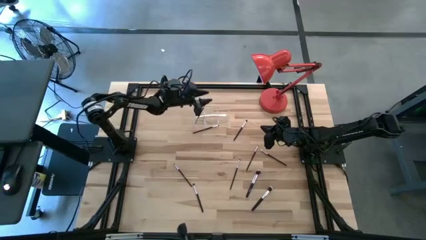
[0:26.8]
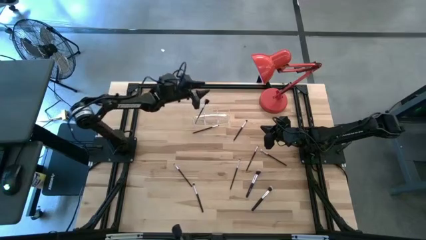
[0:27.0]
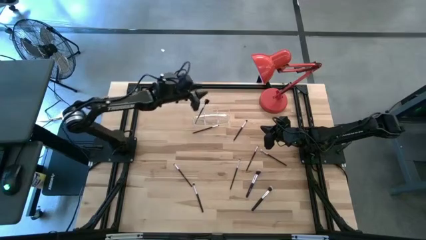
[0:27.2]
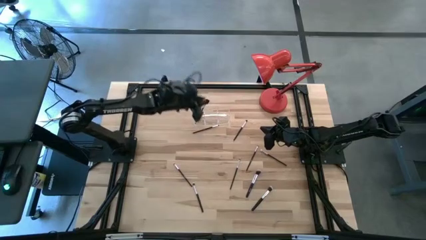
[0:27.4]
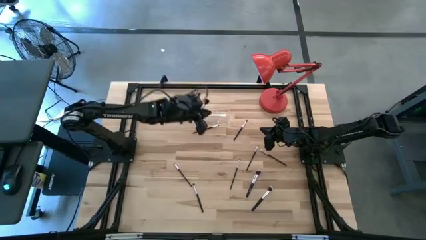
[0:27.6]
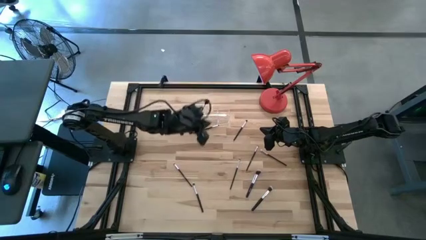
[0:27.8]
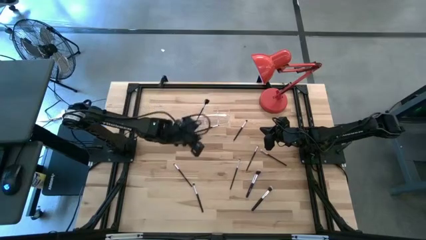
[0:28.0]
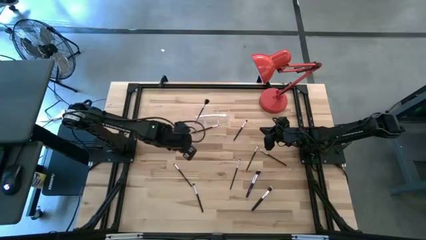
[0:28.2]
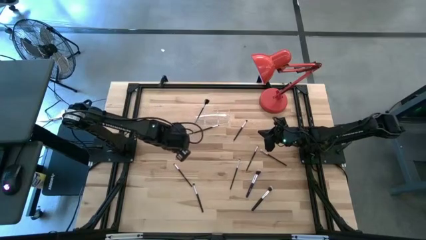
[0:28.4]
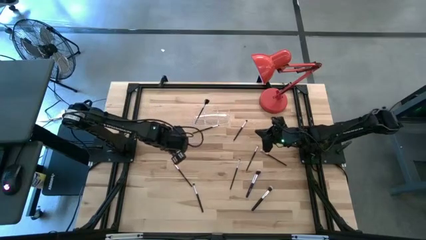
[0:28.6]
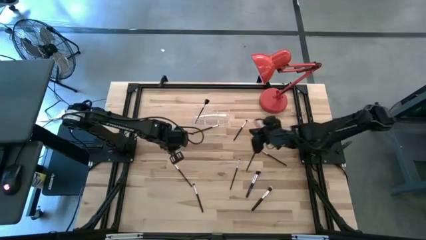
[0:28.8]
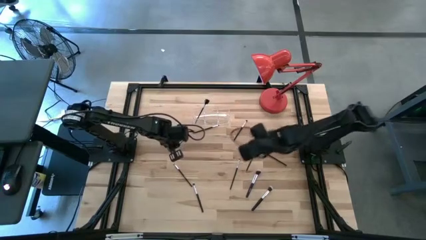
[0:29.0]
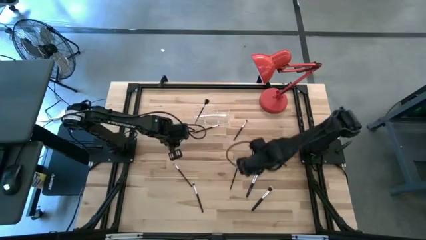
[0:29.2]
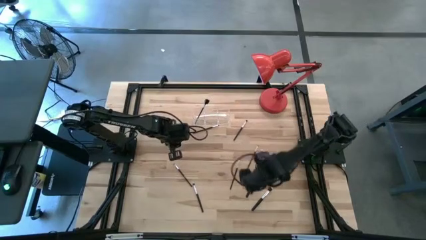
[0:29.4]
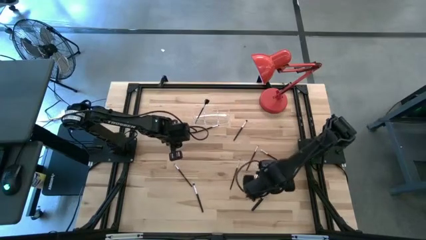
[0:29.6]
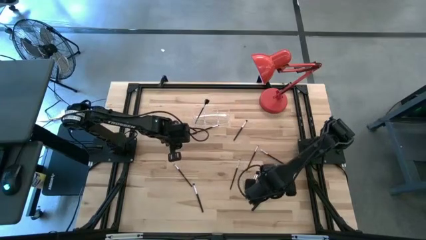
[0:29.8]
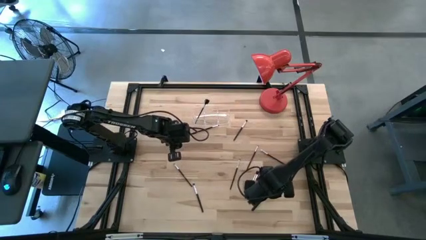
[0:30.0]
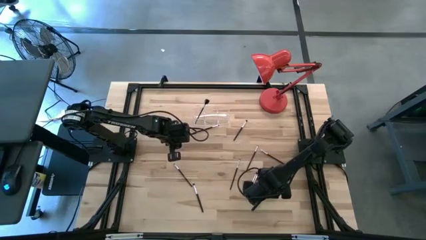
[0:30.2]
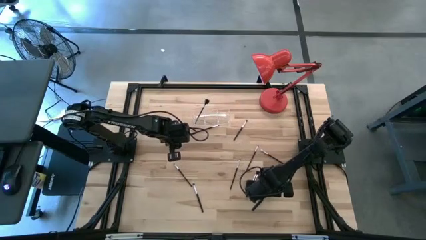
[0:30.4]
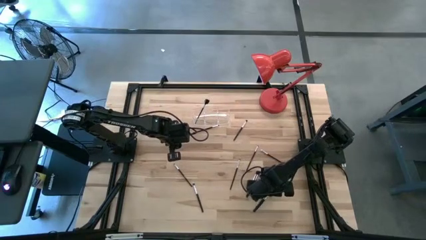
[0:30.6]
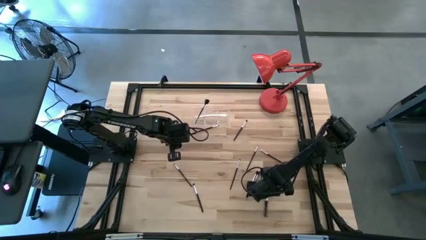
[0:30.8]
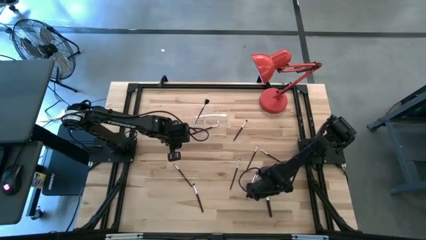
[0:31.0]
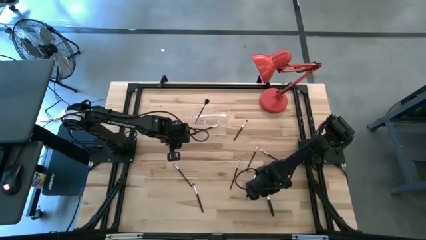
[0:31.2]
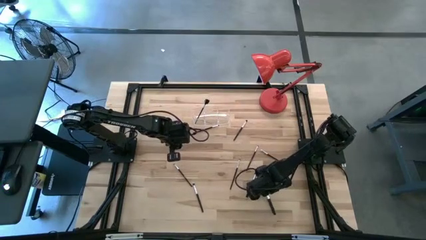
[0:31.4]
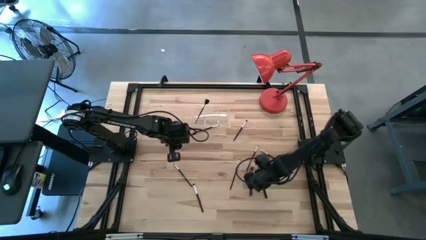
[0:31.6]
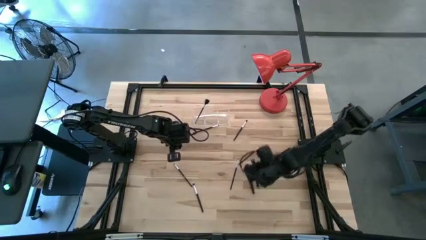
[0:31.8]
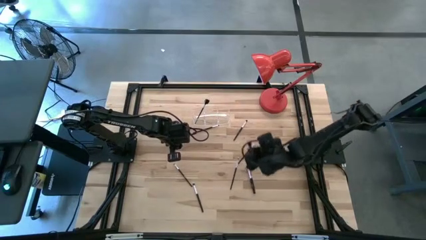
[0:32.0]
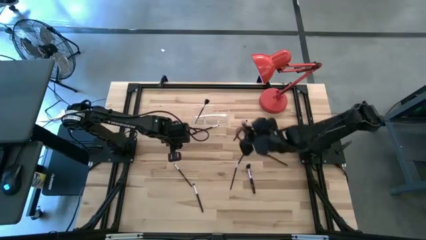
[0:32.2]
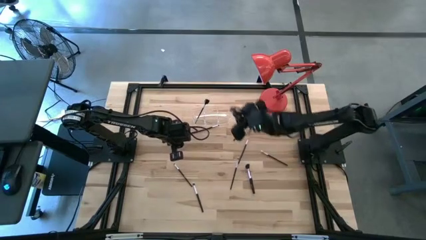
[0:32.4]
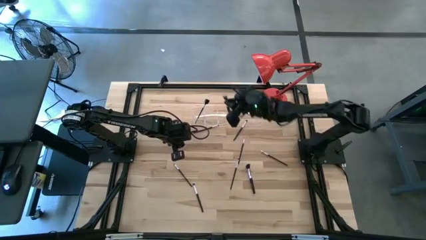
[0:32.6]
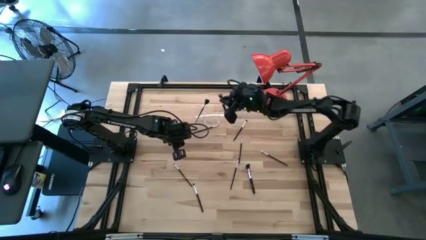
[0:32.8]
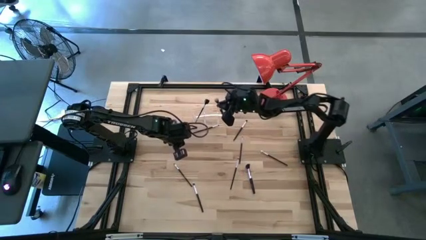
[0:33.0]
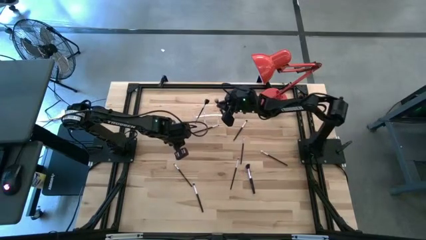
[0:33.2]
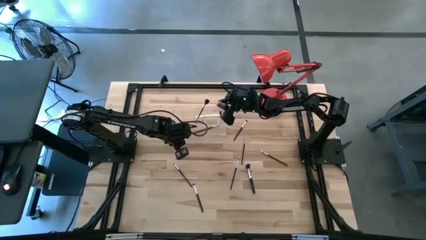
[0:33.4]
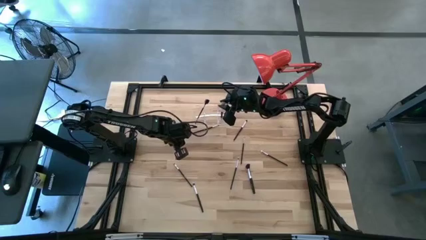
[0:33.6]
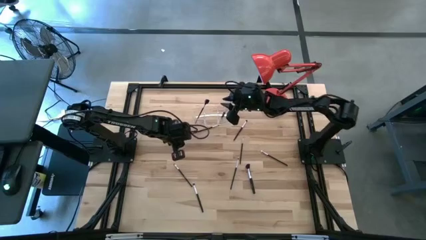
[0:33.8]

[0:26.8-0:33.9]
Task: Put items in baskets/containers
Put the black blush brush into the transparent organizer

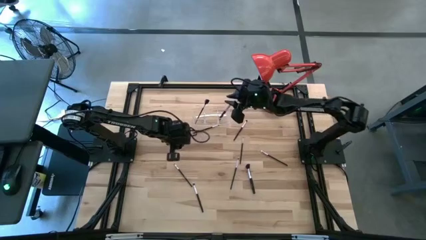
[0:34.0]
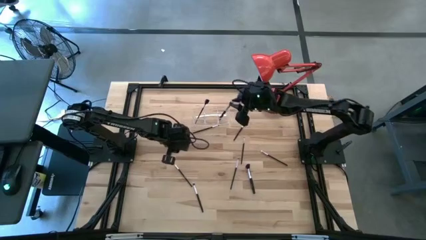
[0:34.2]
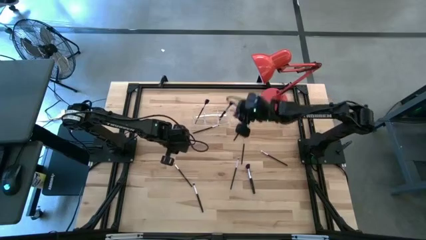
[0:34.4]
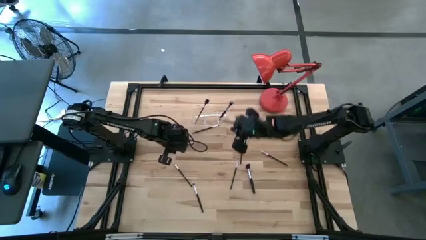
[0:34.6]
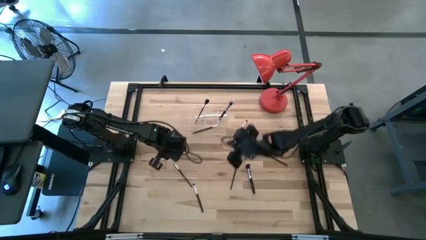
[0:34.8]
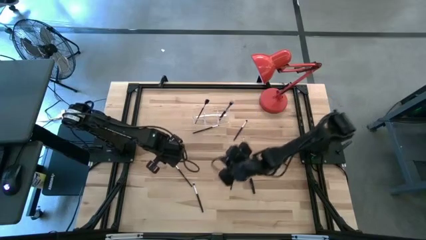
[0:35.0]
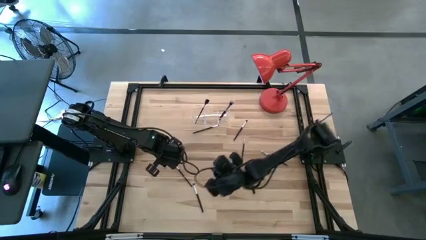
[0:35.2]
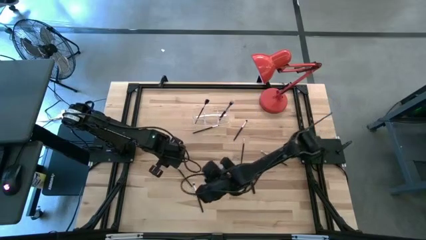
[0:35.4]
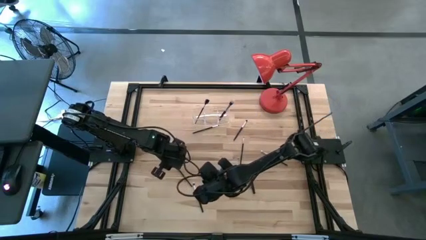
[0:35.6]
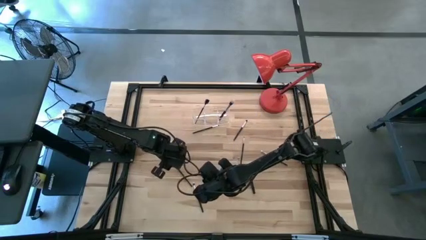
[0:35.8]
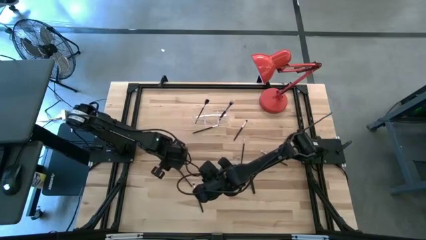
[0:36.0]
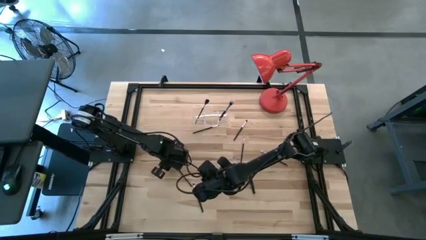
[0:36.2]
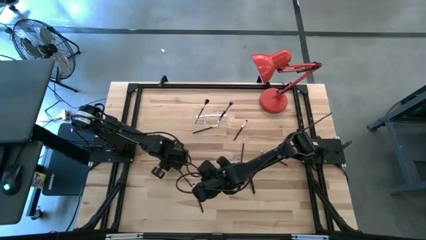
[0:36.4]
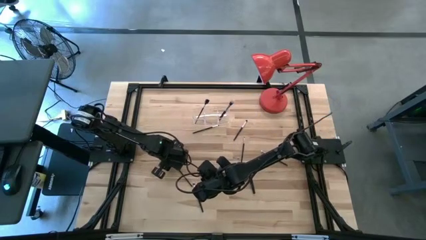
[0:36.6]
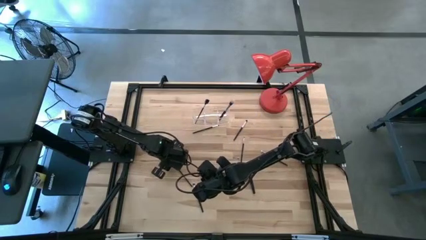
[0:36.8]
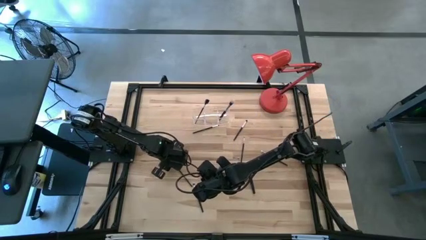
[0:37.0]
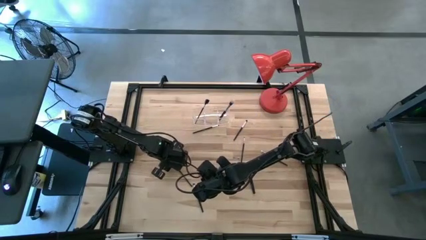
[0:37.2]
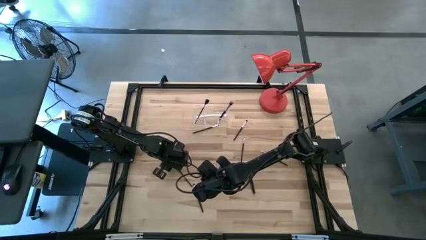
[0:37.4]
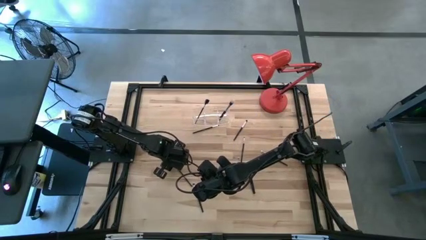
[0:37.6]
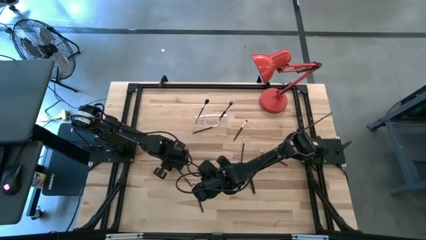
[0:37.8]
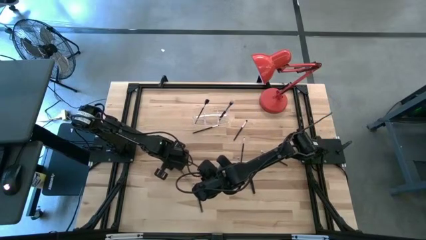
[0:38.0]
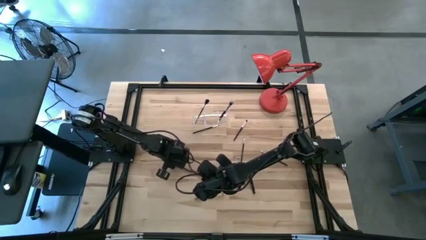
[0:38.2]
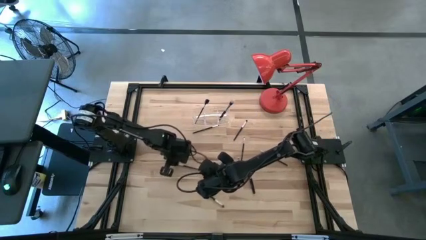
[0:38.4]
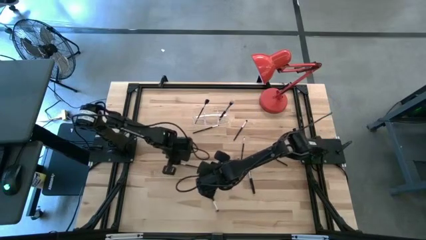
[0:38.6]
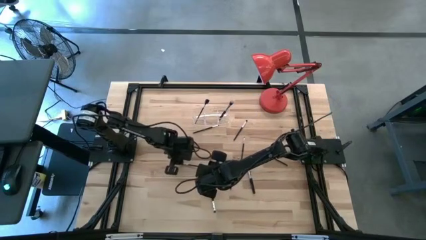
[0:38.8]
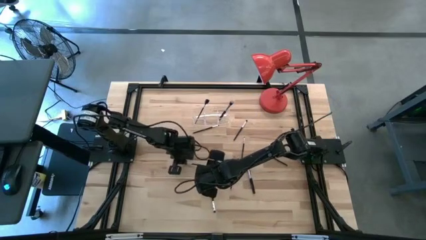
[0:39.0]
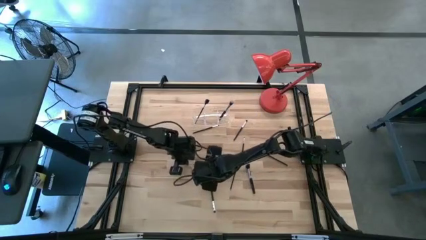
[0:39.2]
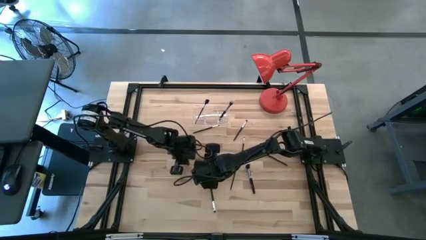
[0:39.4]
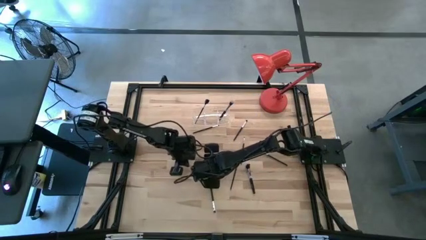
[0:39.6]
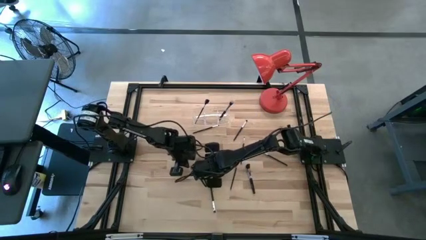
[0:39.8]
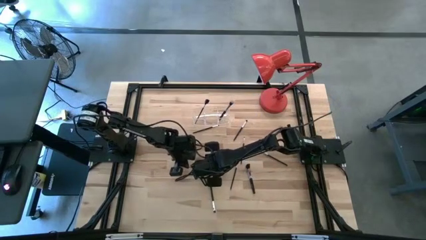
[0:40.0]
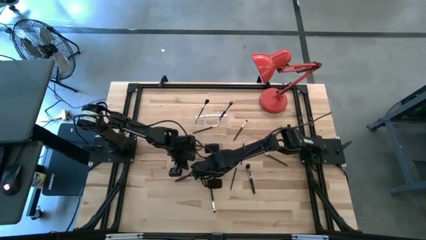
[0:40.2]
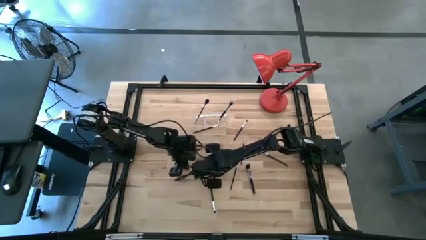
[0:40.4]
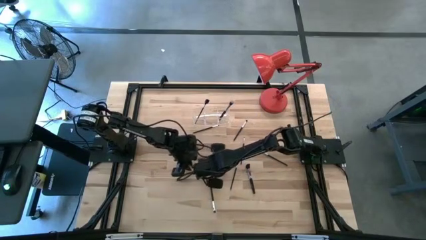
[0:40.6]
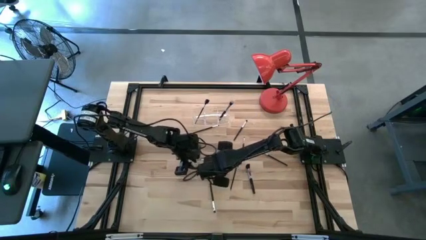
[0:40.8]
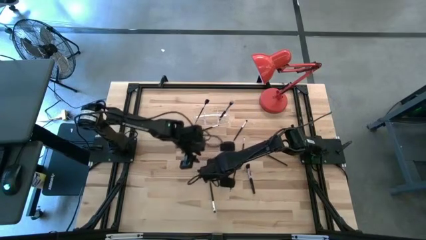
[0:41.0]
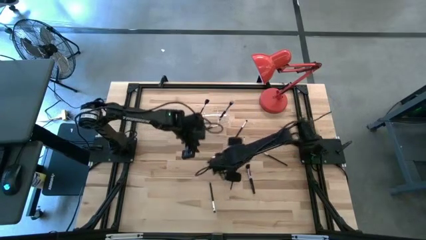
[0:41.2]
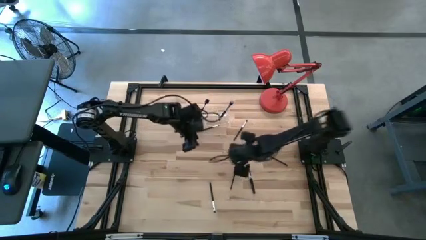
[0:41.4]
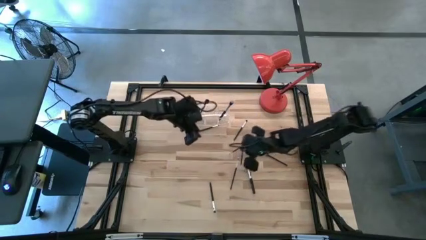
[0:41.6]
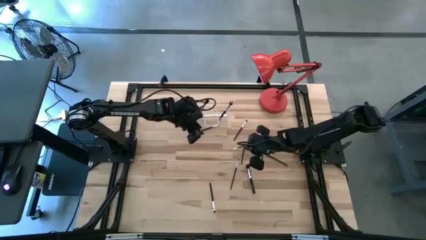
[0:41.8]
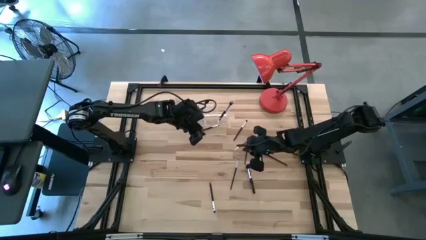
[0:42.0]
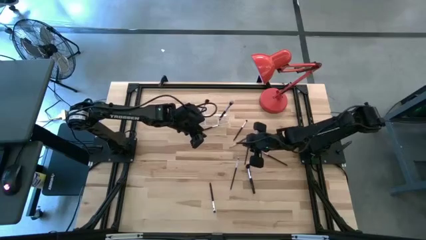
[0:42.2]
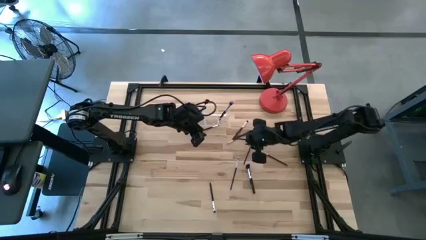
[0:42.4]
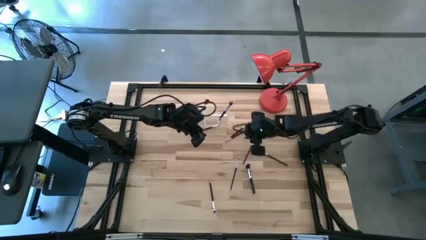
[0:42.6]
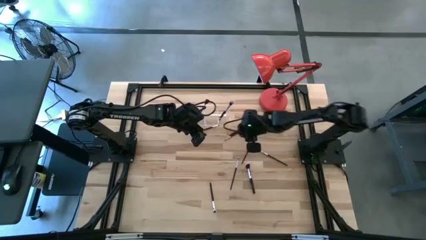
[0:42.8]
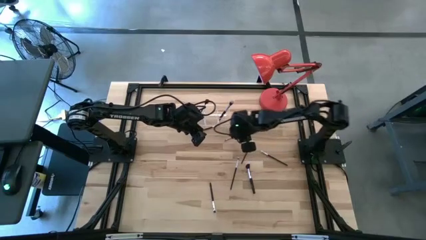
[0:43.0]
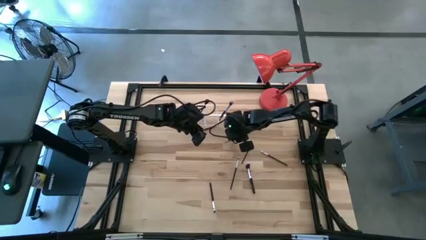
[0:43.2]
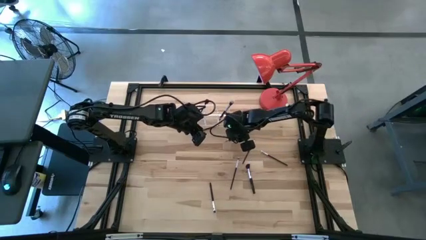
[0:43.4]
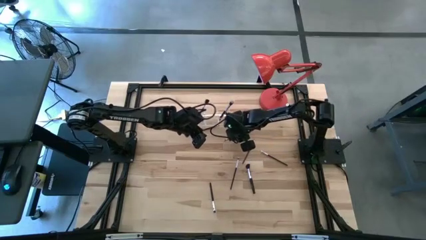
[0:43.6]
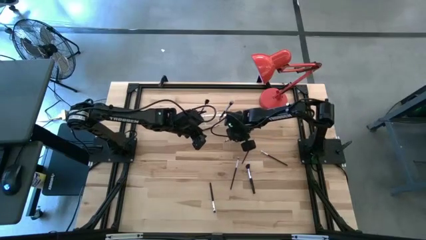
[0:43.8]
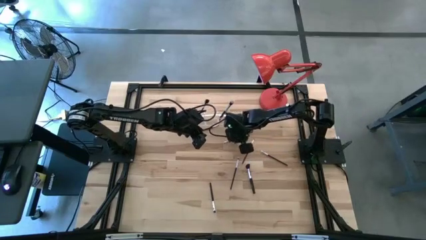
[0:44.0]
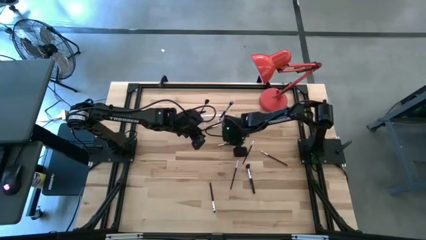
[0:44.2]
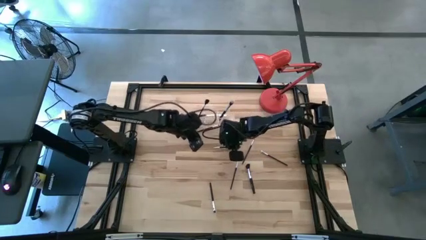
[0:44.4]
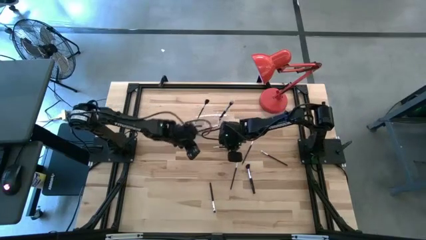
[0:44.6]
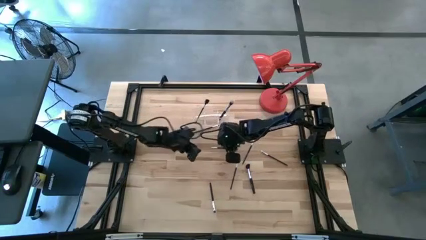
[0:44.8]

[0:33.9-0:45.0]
Put the black eyeshadow brush into the transparent organizer
